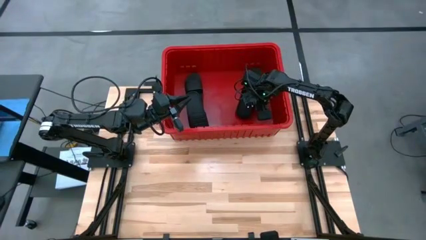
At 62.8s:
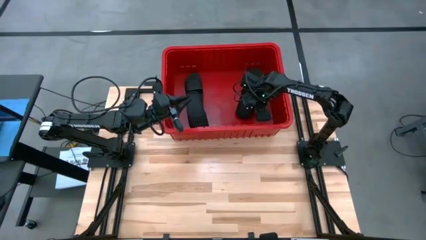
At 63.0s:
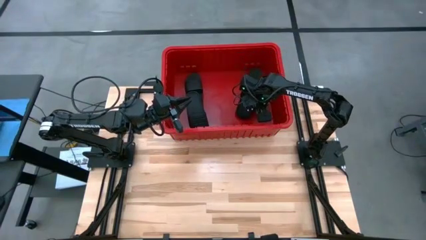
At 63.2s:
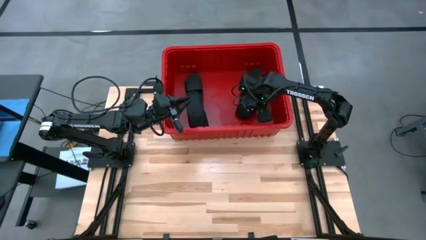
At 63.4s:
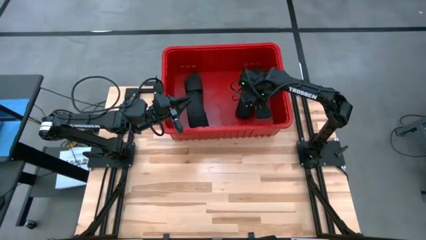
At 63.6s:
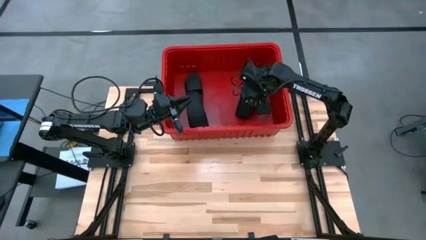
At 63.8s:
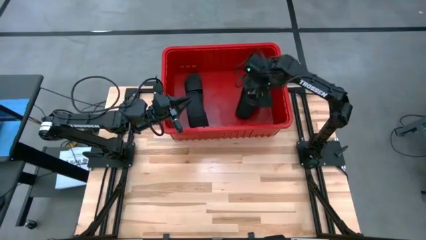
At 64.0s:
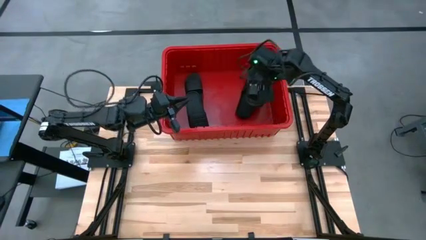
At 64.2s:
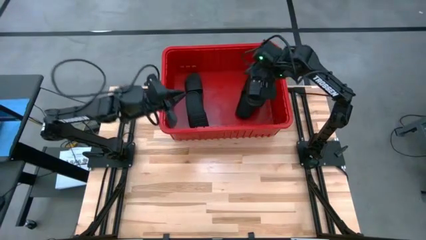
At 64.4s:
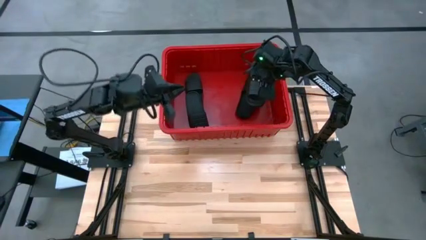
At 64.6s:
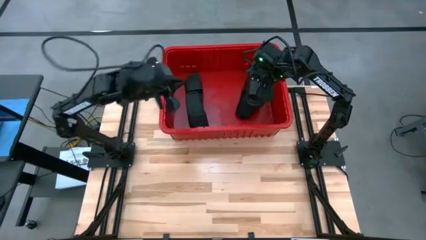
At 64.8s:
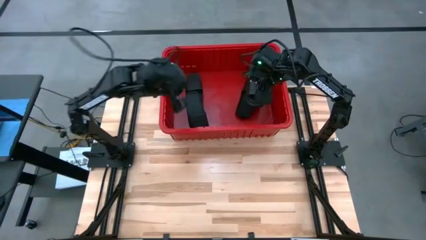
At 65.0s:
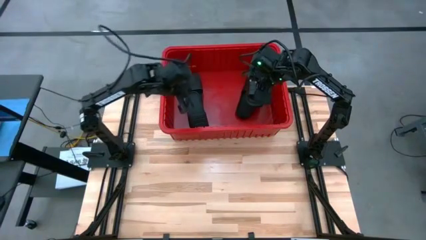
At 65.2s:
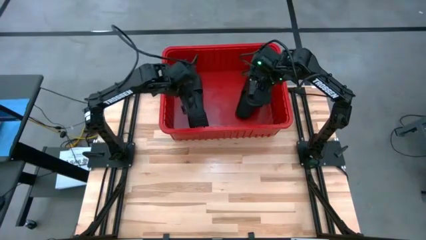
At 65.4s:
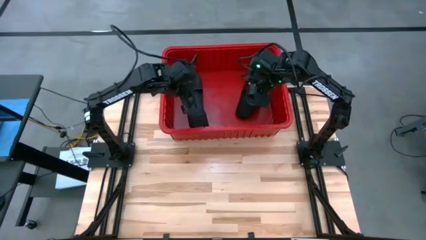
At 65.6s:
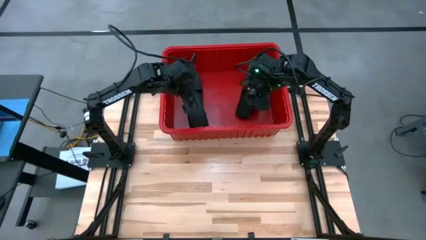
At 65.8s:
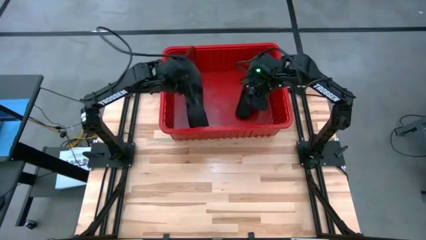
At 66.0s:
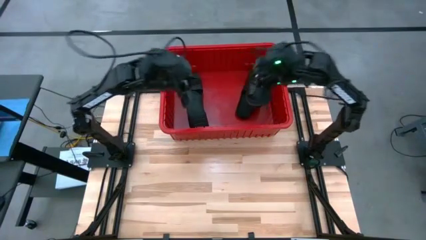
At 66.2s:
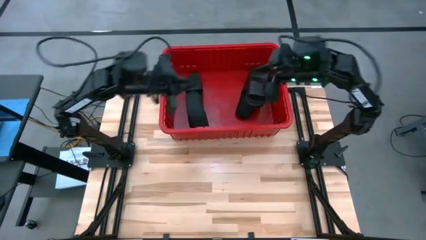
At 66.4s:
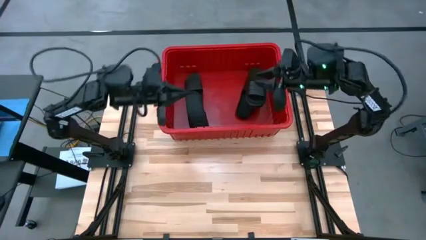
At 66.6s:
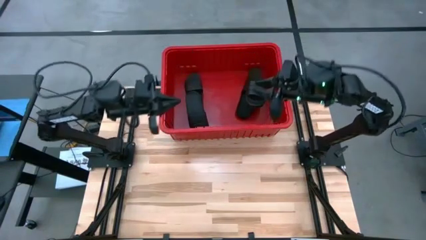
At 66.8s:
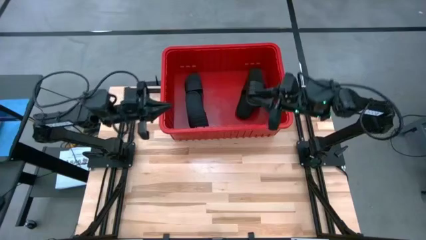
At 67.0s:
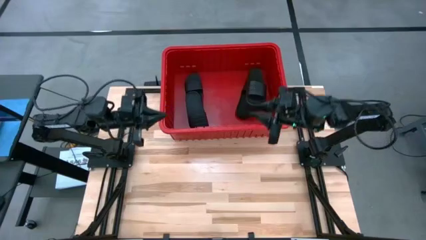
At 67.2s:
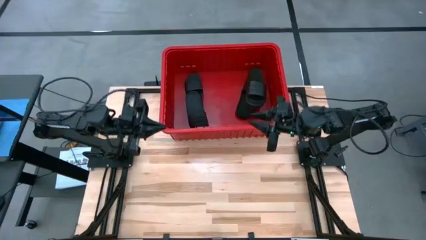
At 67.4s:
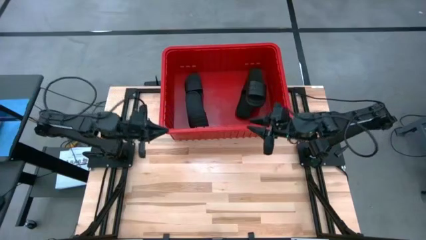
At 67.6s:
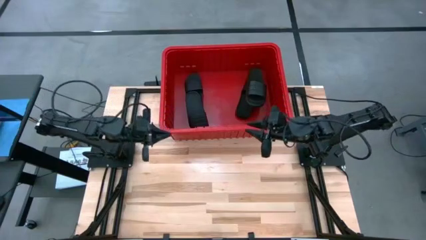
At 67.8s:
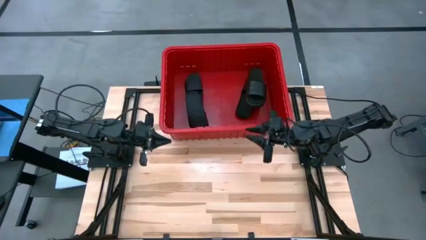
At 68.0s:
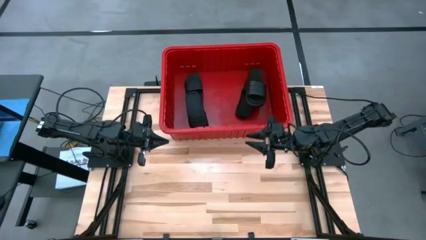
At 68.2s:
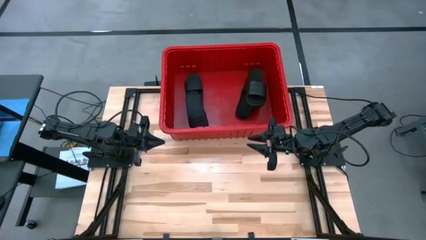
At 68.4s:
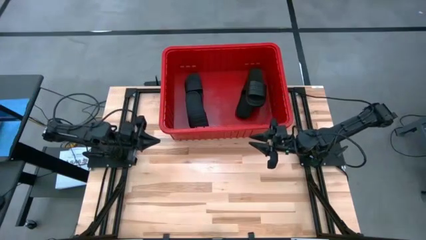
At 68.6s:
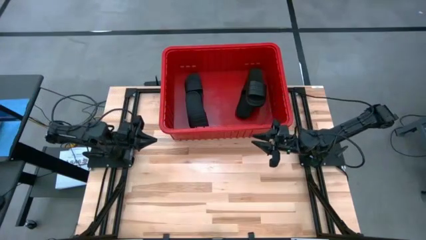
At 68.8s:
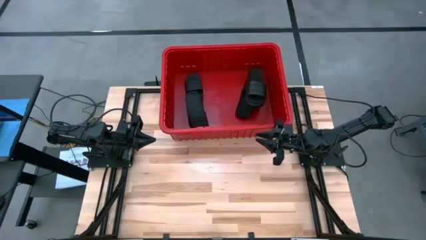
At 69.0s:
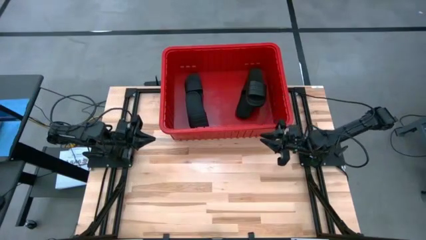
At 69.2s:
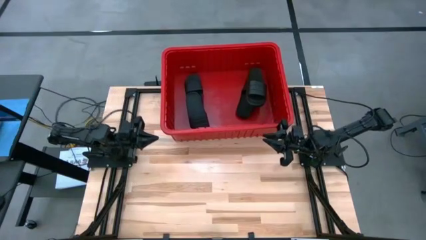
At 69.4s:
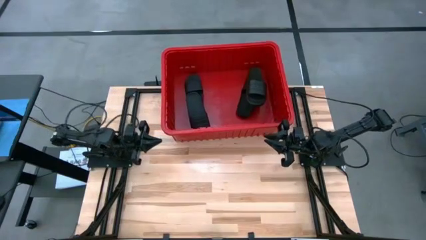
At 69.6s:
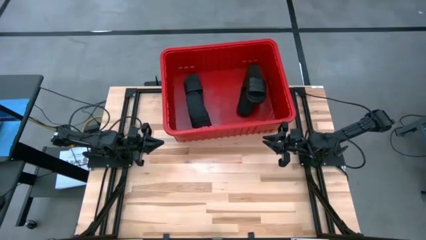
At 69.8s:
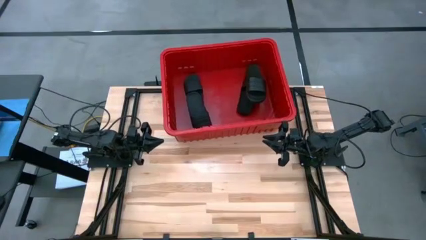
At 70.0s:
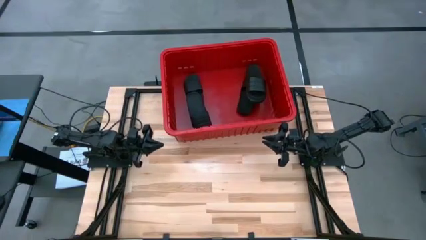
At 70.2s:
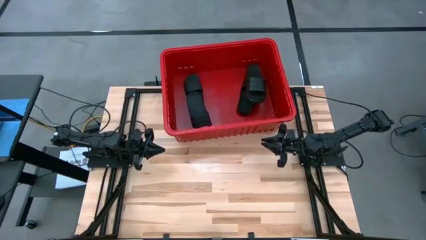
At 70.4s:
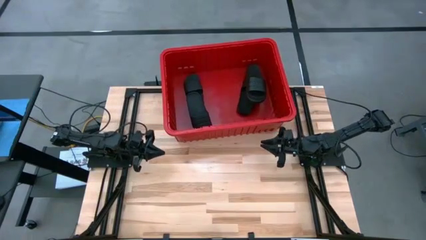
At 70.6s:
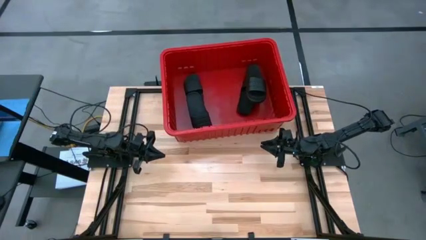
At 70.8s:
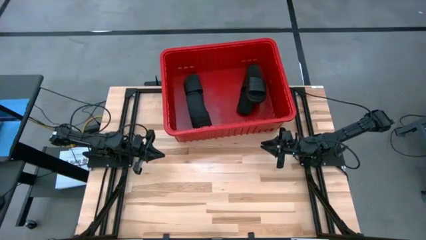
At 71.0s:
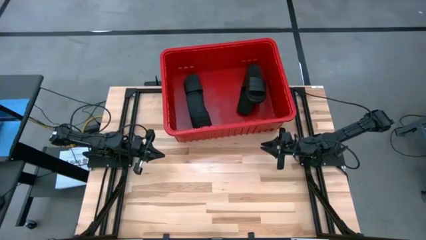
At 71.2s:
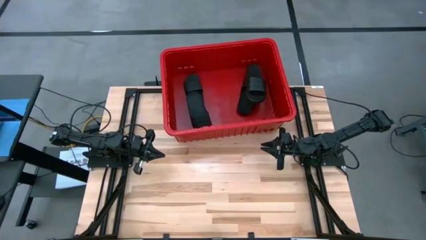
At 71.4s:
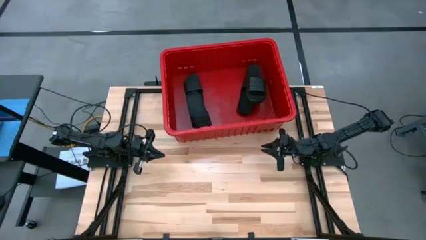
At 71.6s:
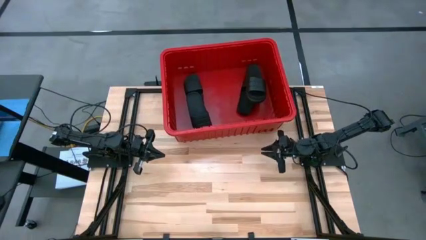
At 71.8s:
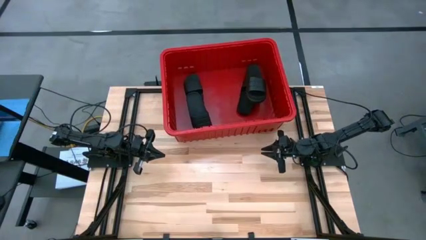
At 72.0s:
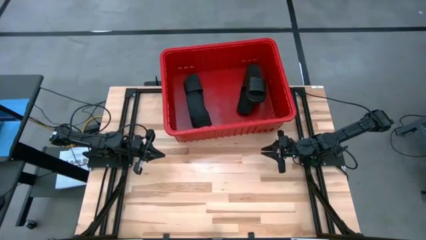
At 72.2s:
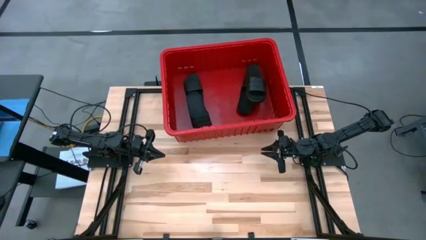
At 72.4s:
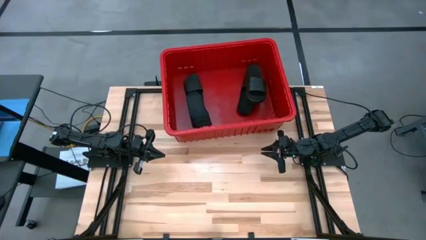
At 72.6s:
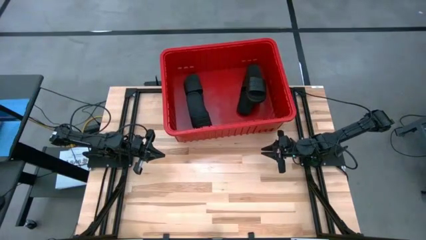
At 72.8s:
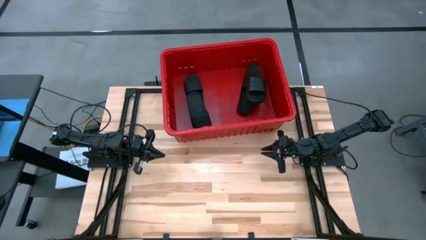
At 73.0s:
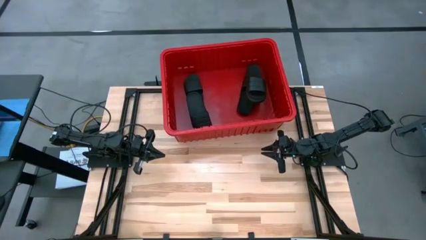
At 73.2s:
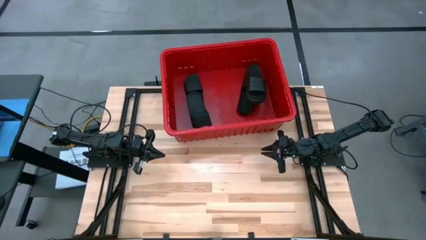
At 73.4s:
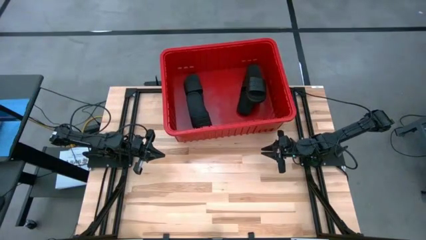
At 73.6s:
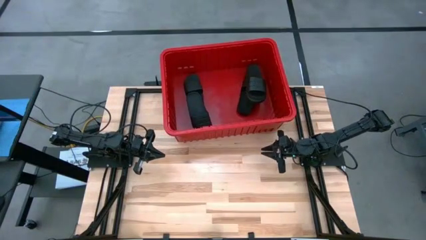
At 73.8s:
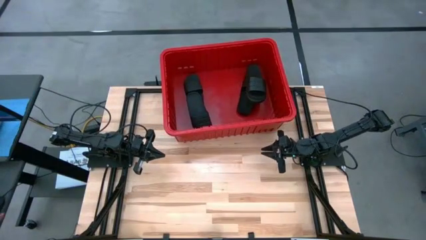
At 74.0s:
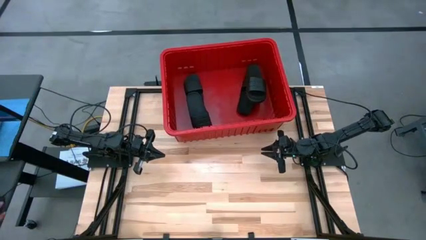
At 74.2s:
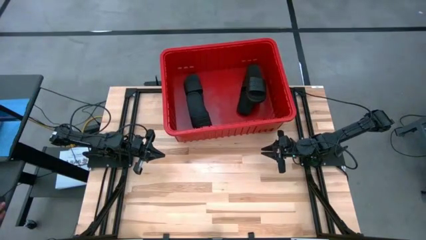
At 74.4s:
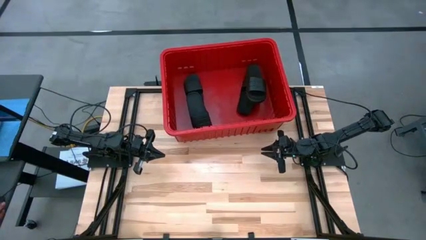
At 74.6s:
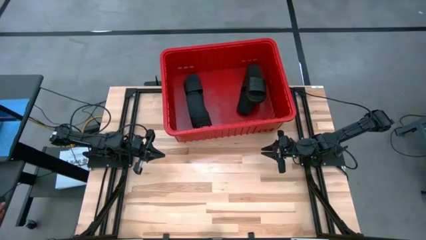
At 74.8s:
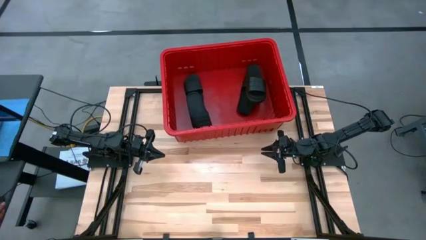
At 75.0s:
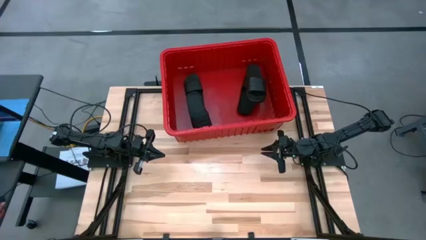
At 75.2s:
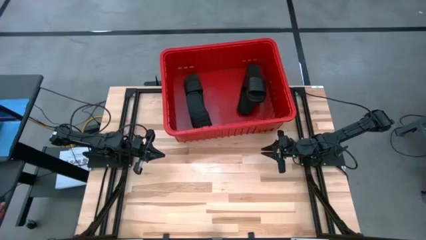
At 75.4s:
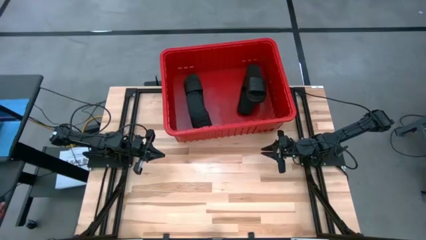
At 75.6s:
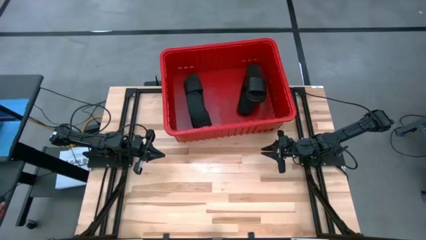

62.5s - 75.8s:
Task: Pick and place slides into bin
Return to Home Position
